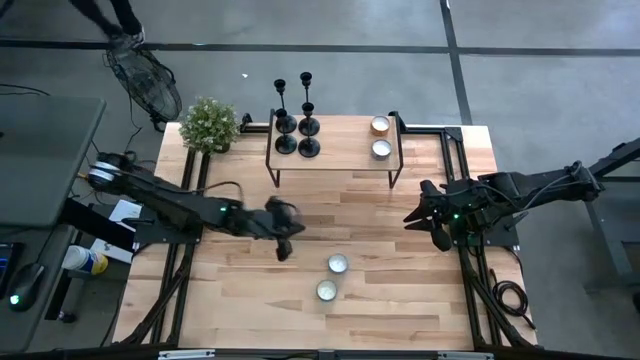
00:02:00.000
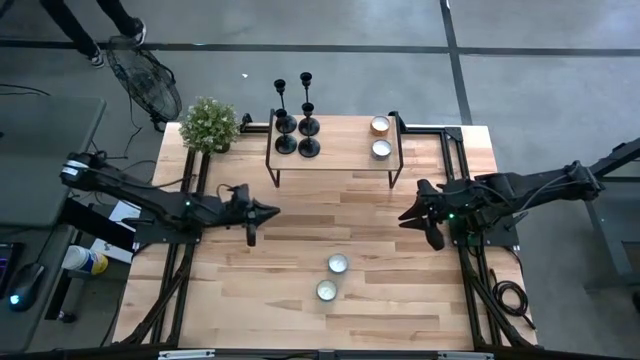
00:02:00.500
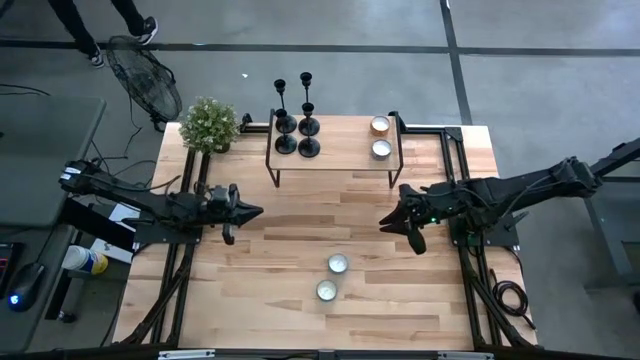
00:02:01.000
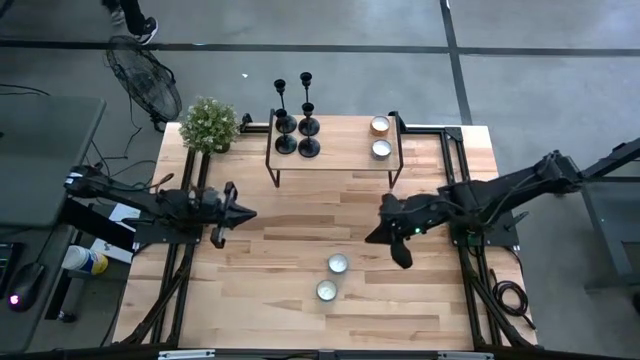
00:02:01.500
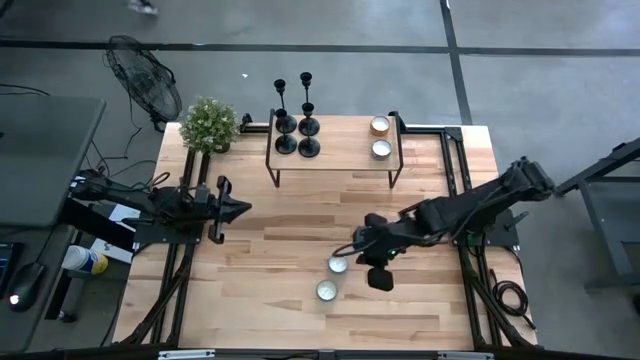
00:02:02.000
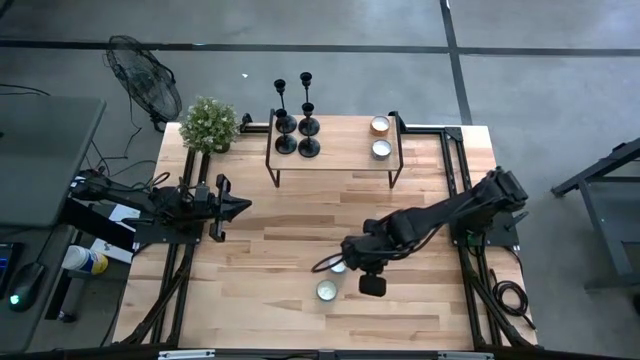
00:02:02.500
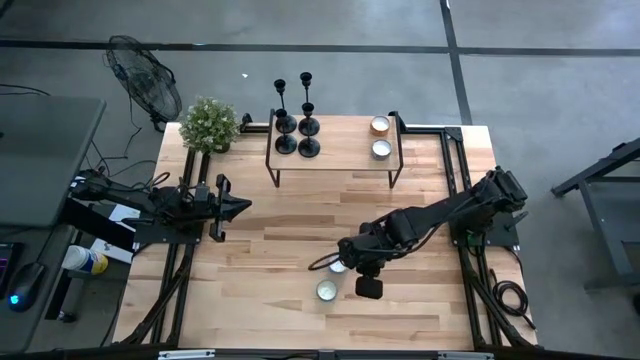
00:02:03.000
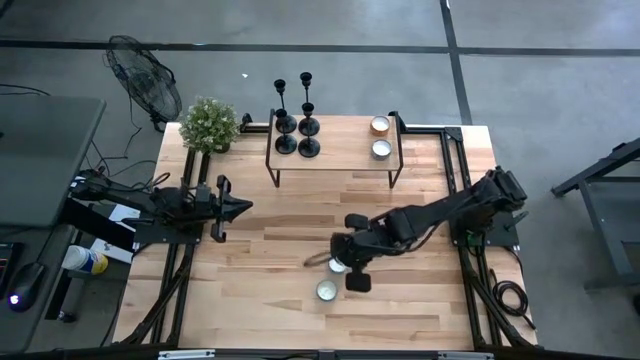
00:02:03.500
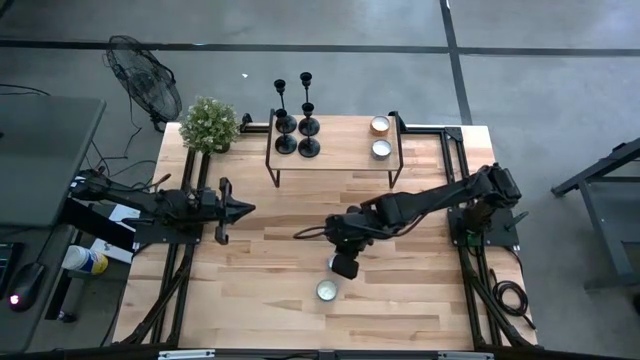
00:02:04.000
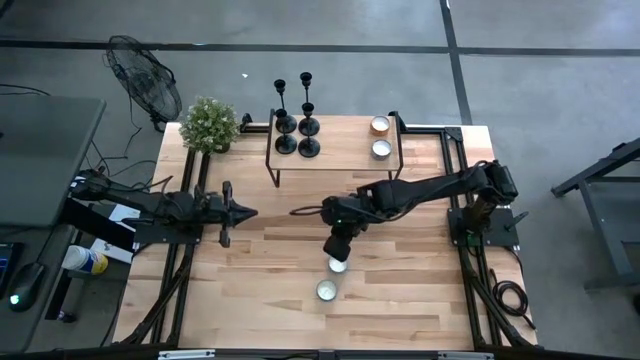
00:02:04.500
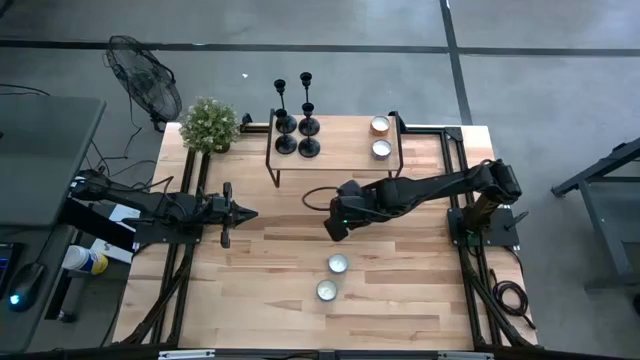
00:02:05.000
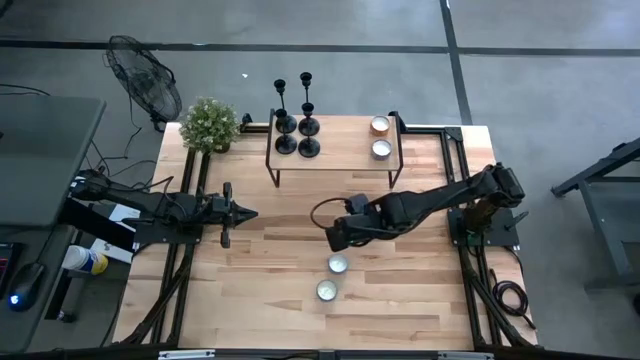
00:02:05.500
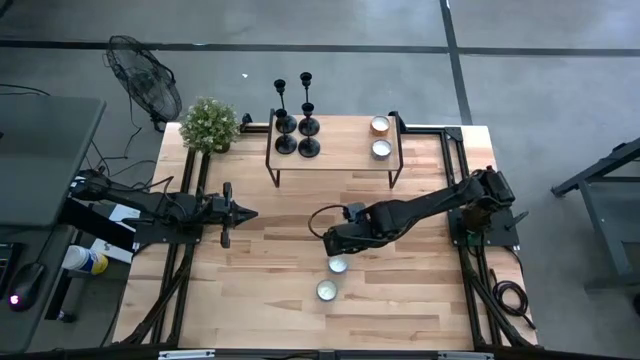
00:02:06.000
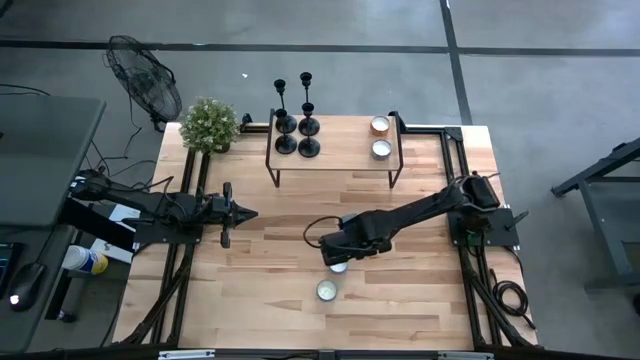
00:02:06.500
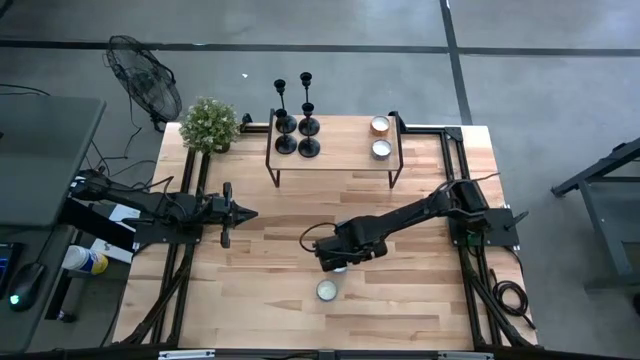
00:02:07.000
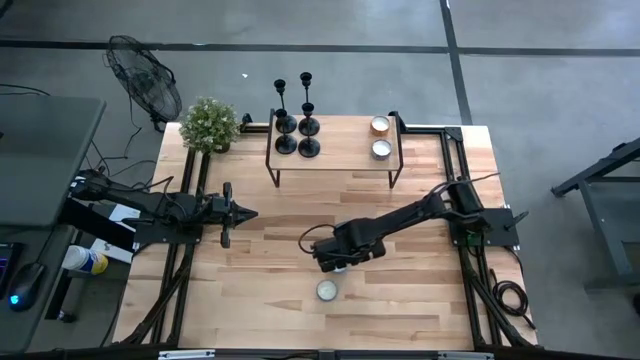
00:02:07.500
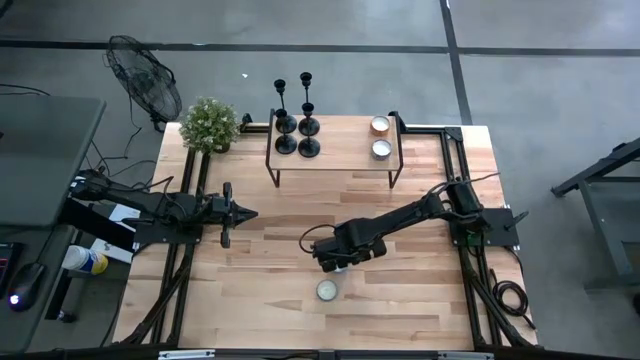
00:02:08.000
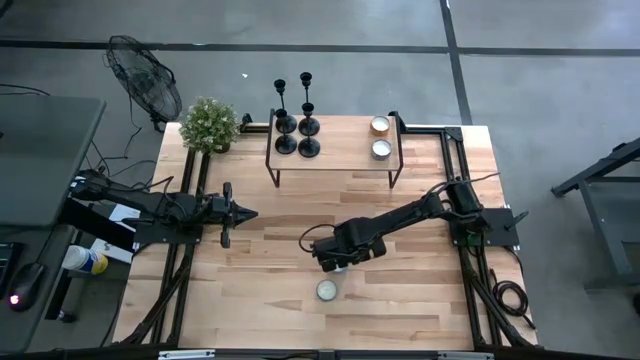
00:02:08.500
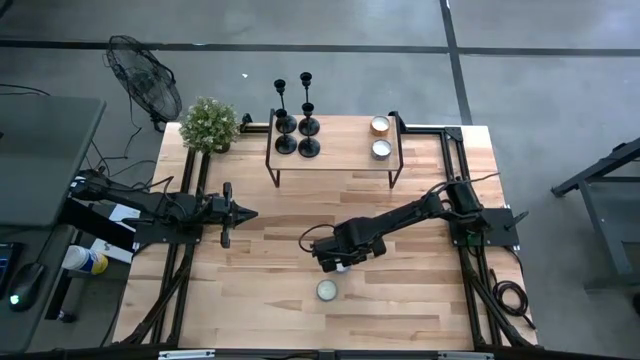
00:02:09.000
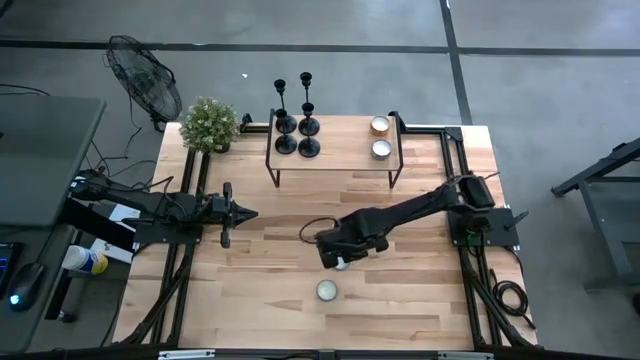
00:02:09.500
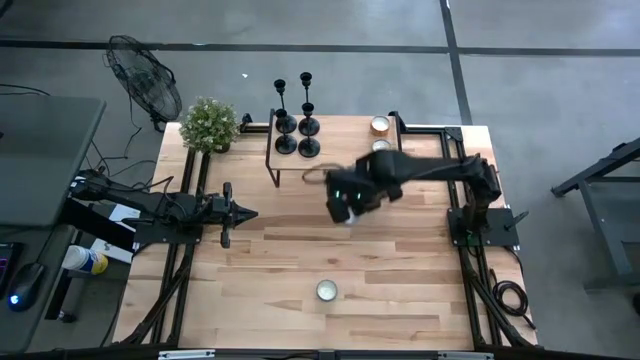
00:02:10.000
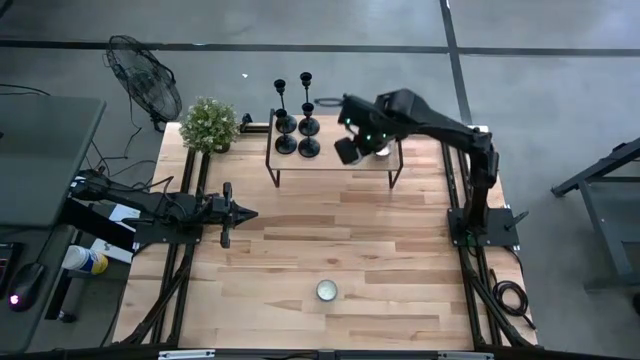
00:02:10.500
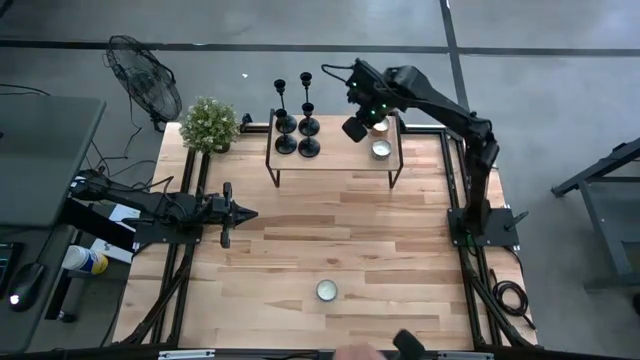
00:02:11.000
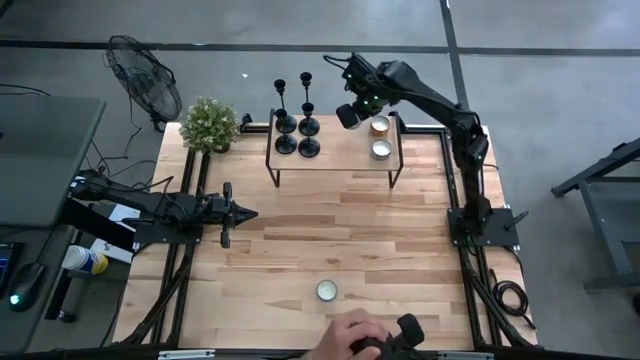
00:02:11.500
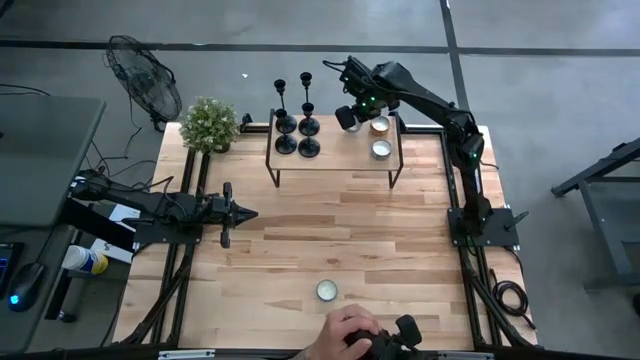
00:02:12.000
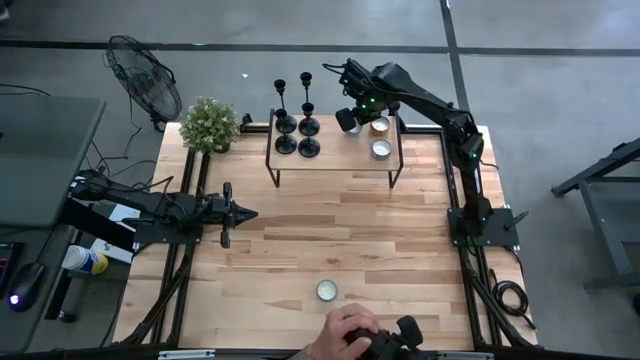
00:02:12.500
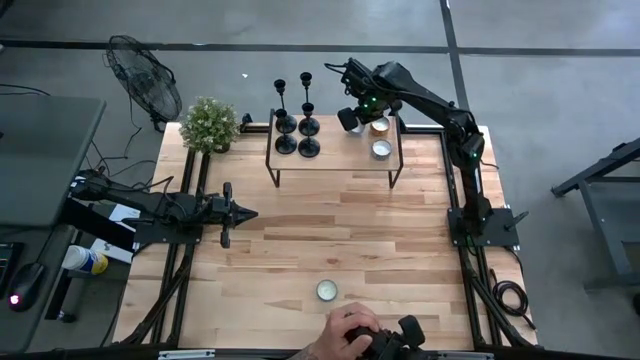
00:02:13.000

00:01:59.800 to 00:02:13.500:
Task: Pick & Place candle stick holders
Put the light blue scented candle on the shelf

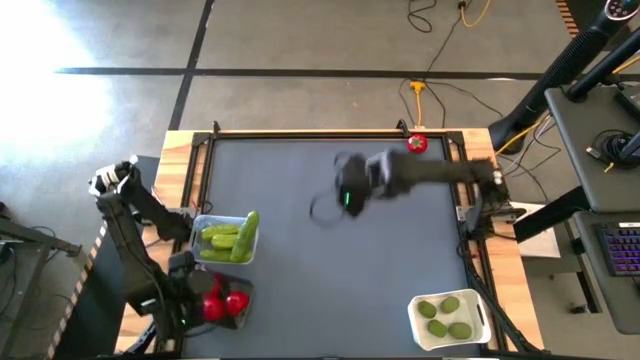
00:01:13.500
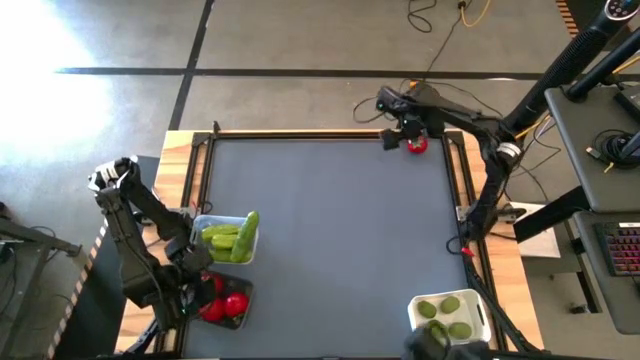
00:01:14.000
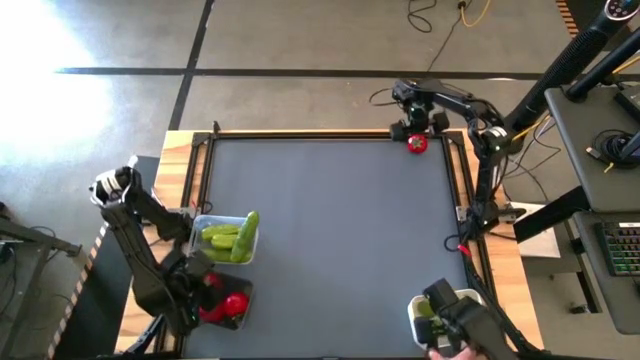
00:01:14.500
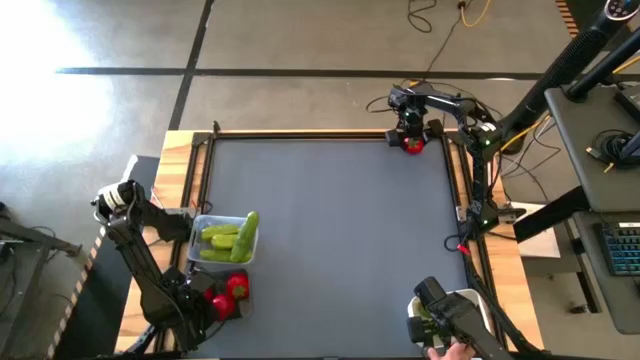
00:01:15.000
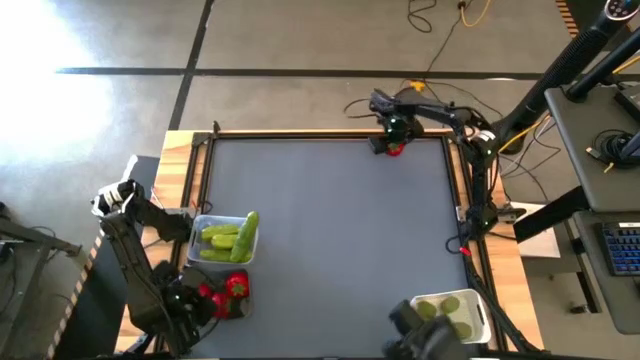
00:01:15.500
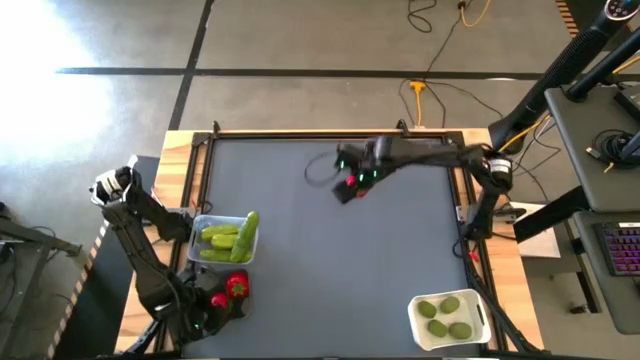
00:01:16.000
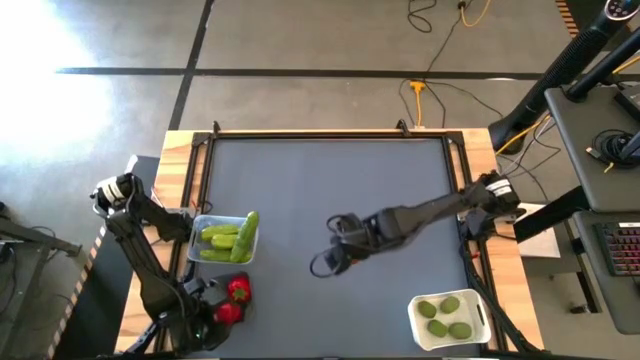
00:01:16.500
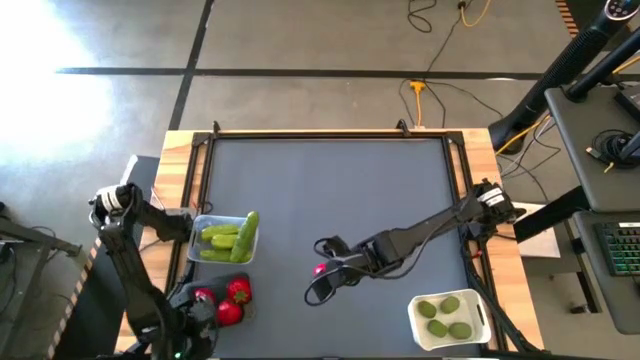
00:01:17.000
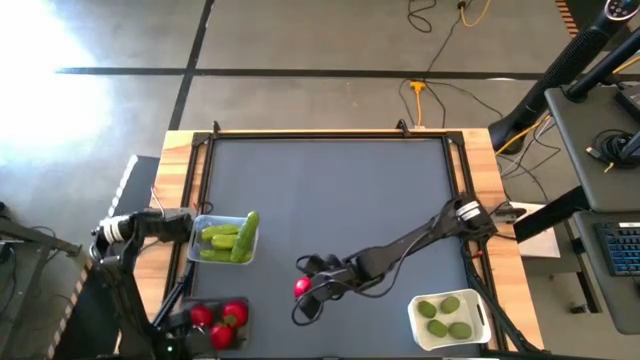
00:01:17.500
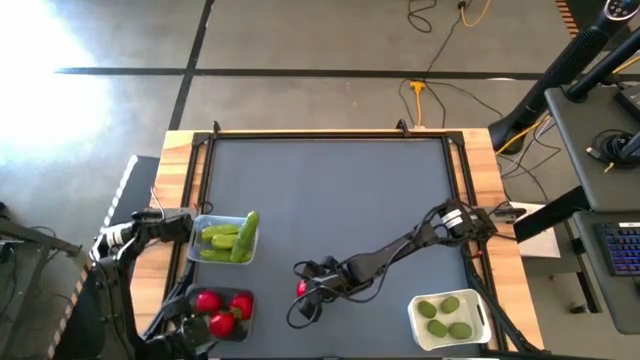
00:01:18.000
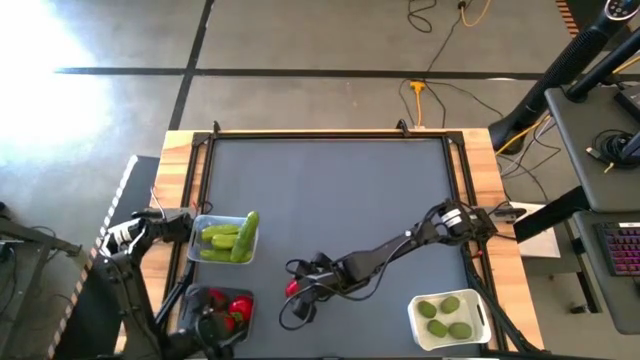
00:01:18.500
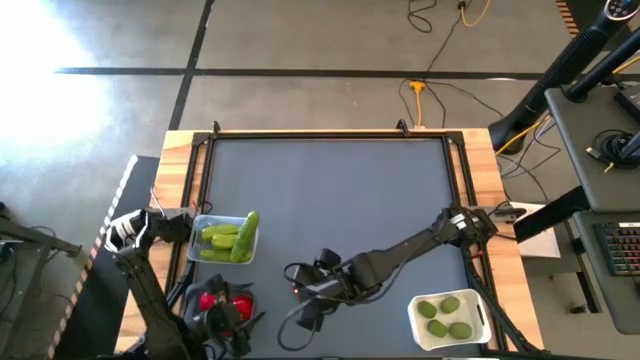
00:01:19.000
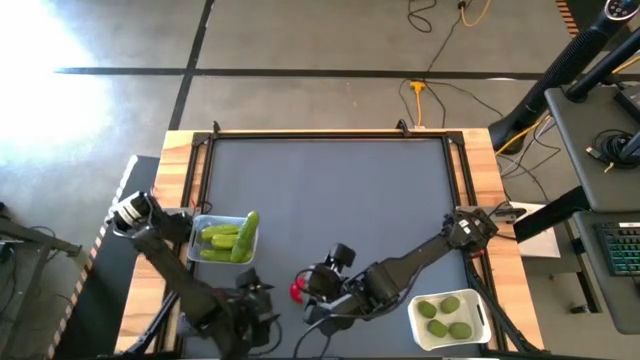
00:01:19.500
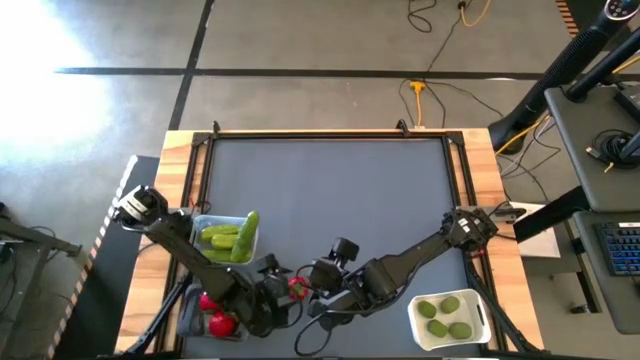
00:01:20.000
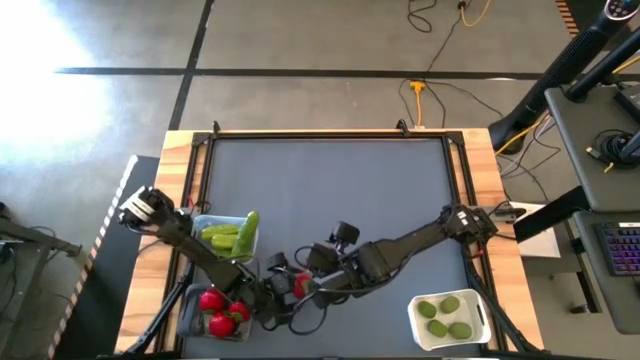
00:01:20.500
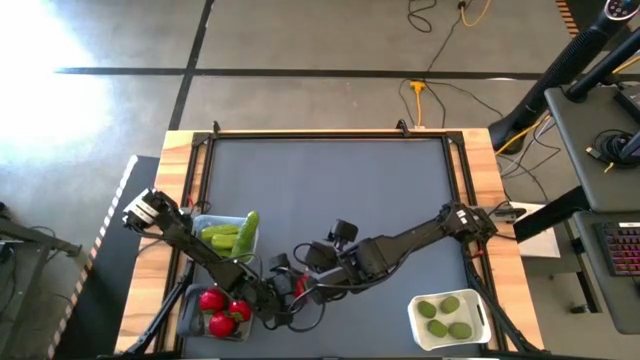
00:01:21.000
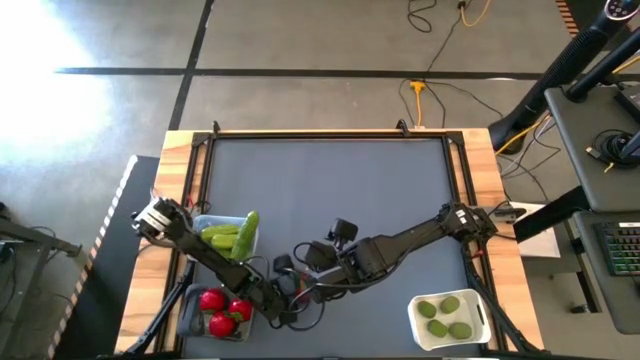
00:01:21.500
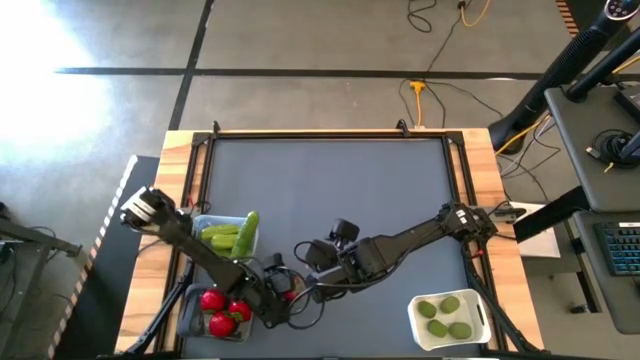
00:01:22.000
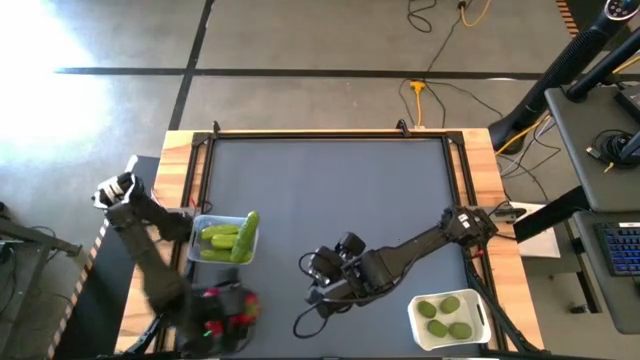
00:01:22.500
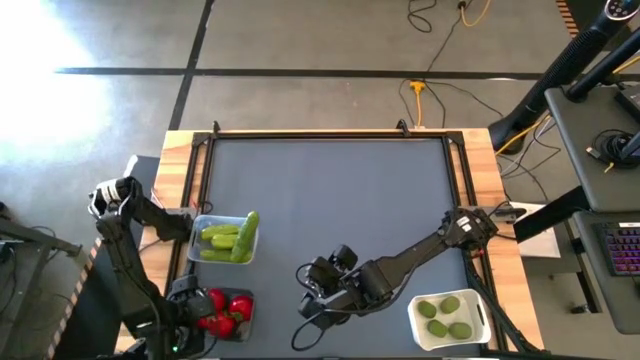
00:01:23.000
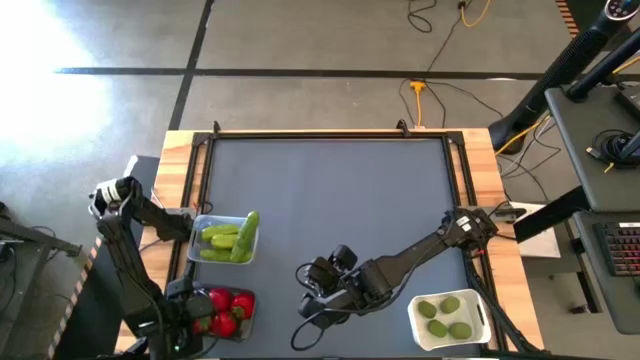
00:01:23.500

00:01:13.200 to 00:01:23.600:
Task: Sort produce into baskets
Put the tomato into the black bin
